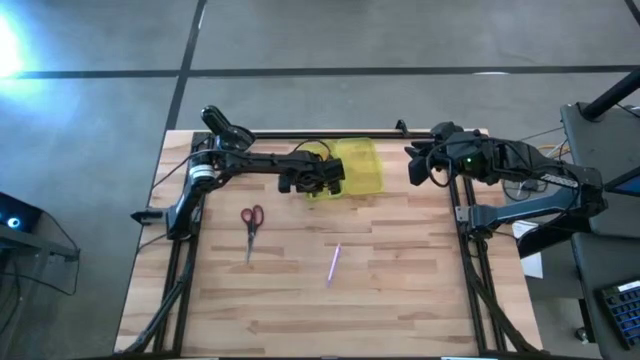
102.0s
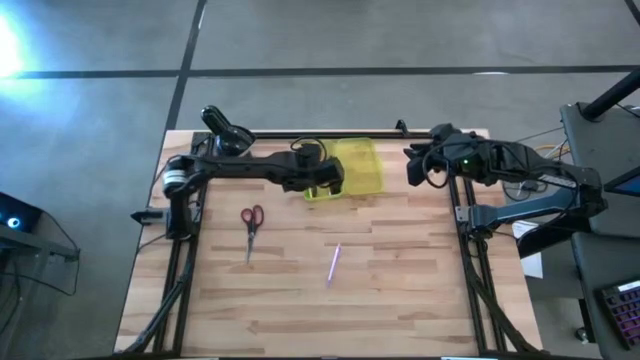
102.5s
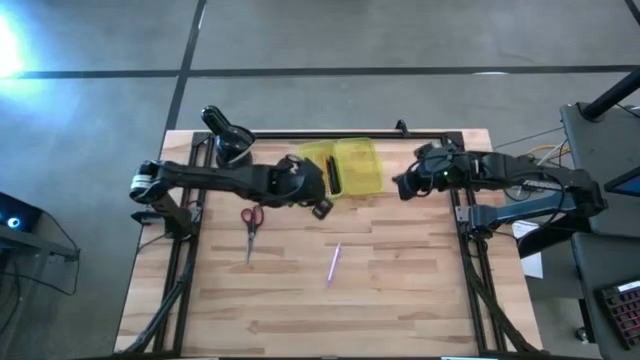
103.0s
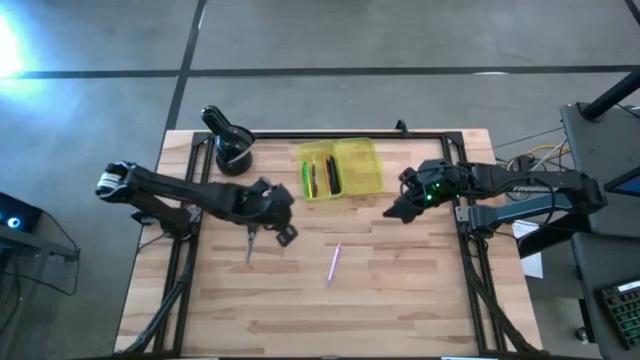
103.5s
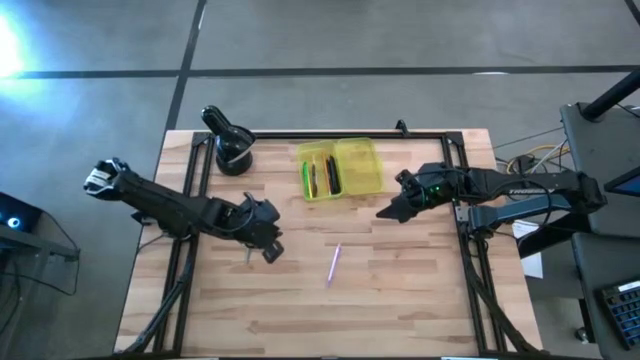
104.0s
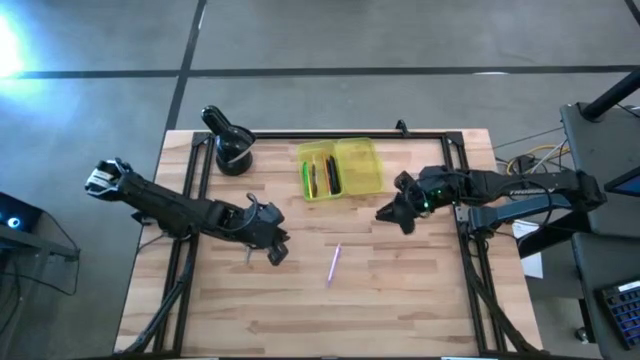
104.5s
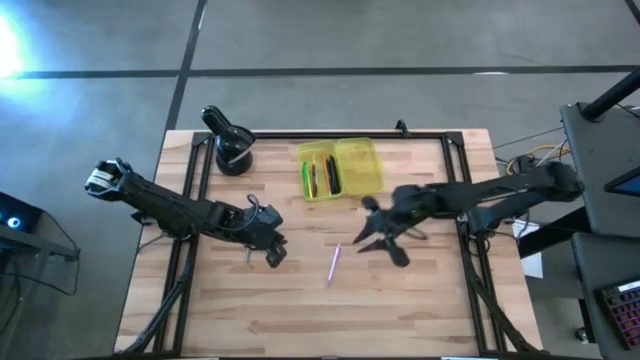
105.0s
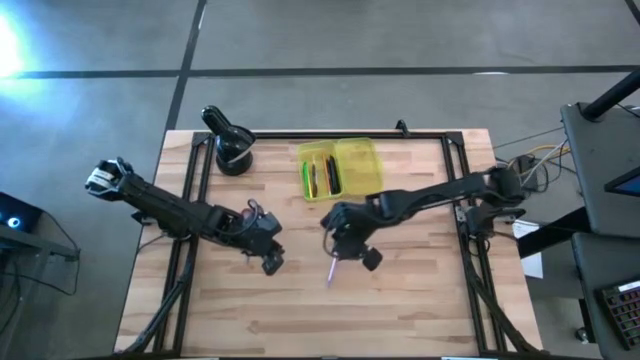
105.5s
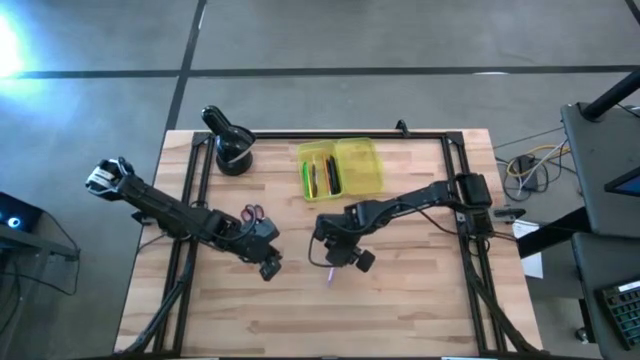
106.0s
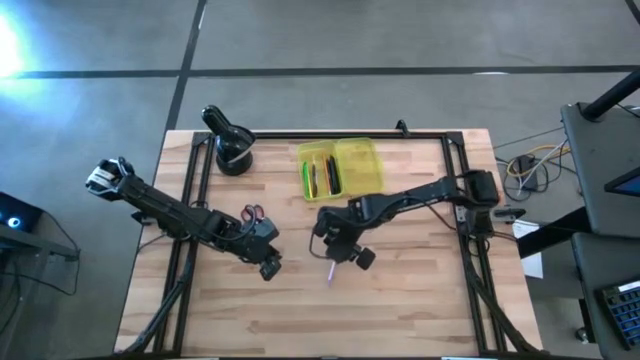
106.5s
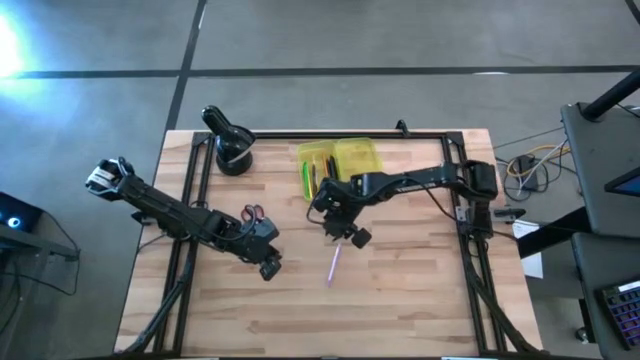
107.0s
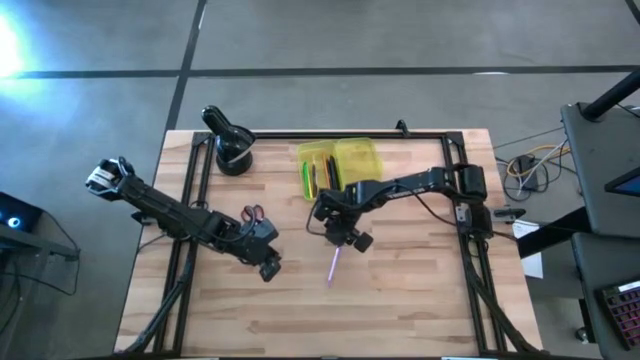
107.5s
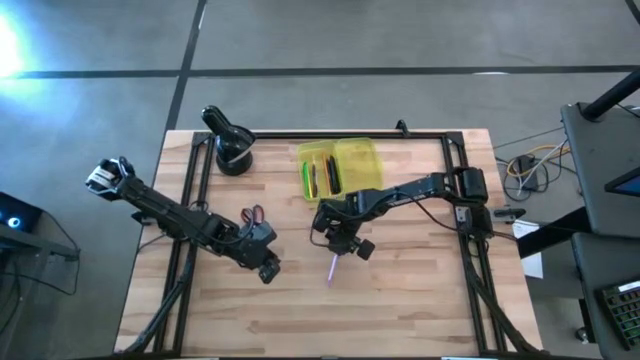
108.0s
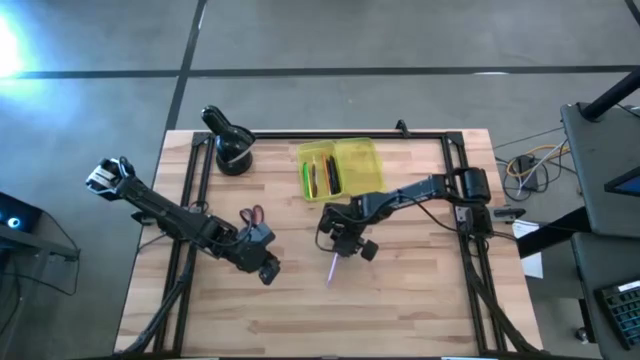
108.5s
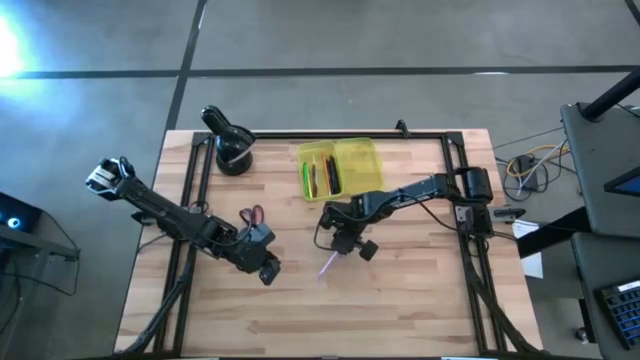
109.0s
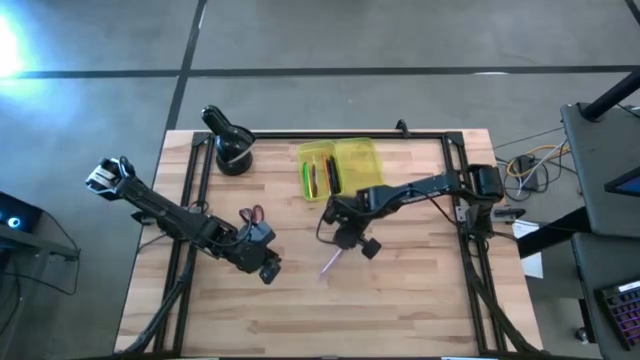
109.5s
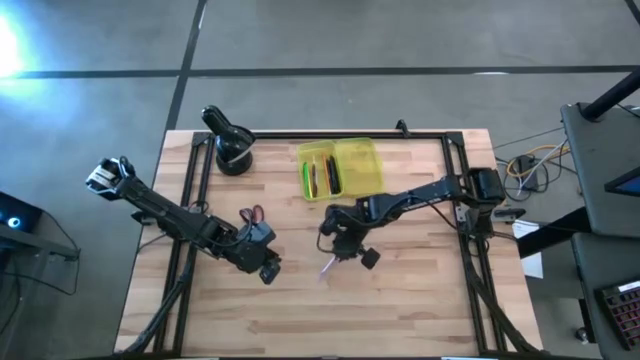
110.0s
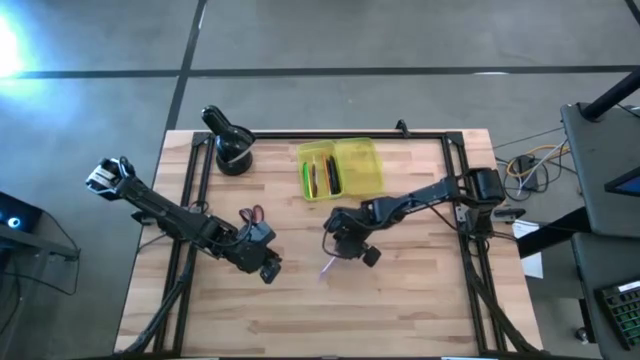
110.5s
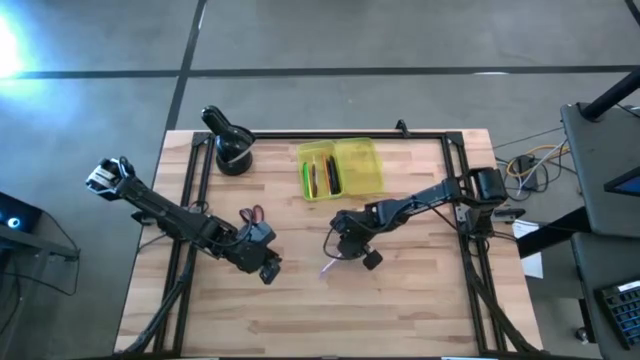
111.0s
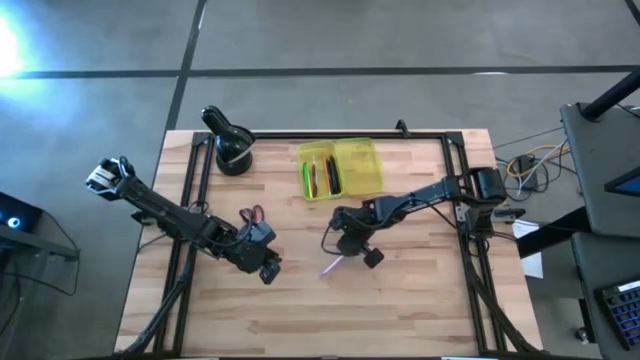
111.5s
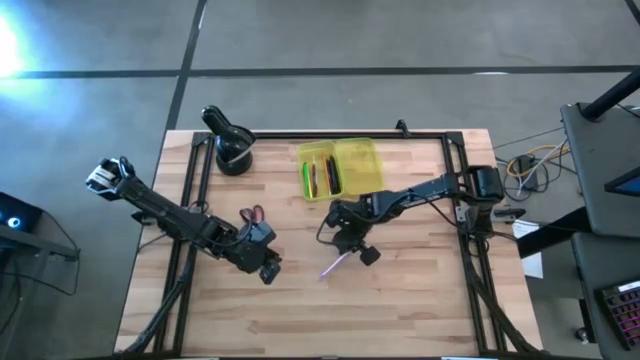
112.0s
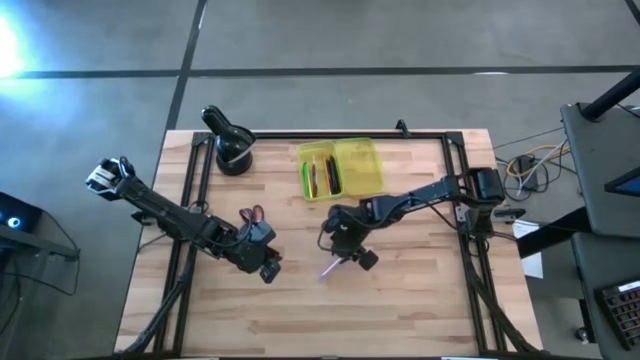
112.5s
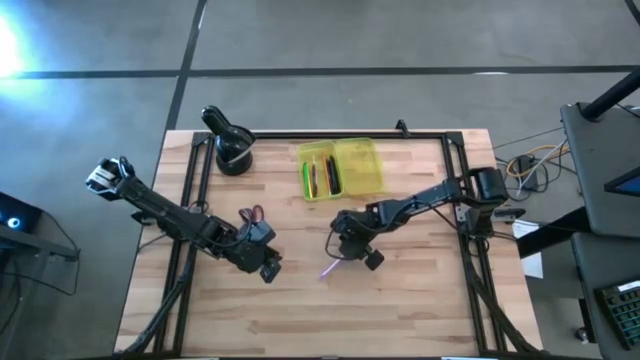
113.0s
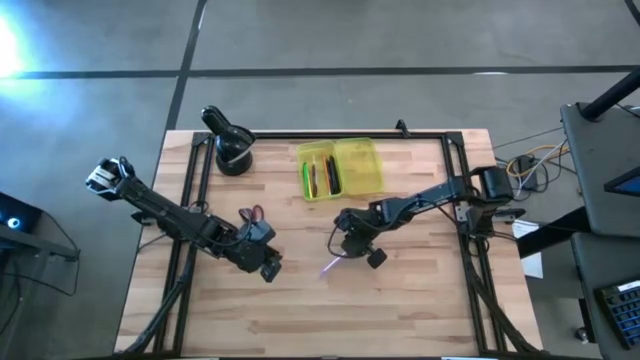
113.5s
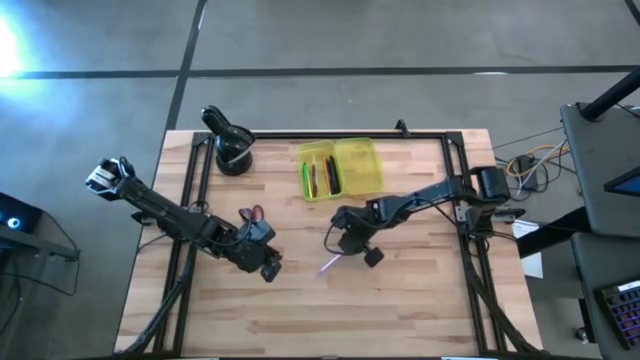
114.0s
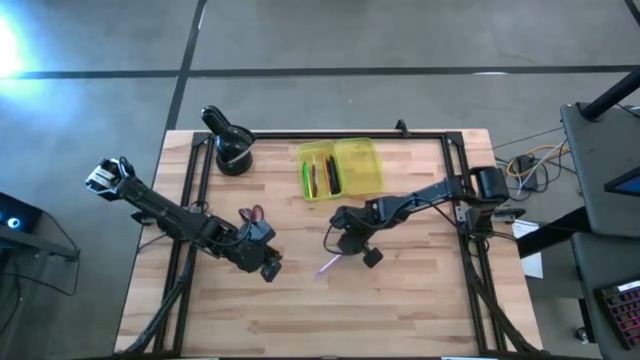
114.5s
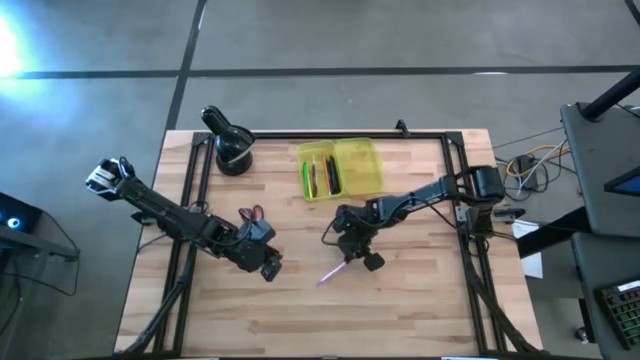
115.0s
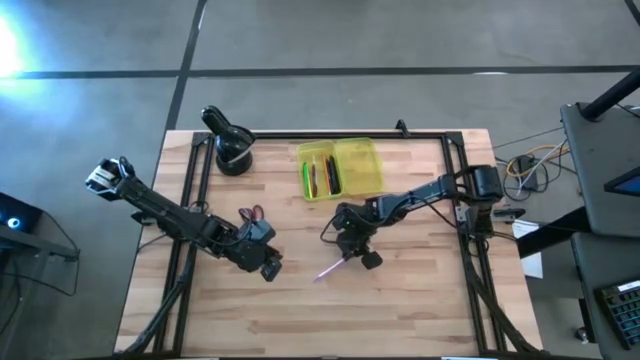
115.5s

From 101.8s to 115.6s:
Task: Pick & place school supplies into a supply box
Put the purple pencil into the yellow supply box

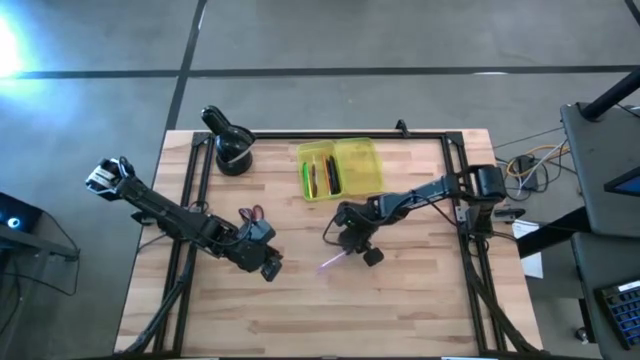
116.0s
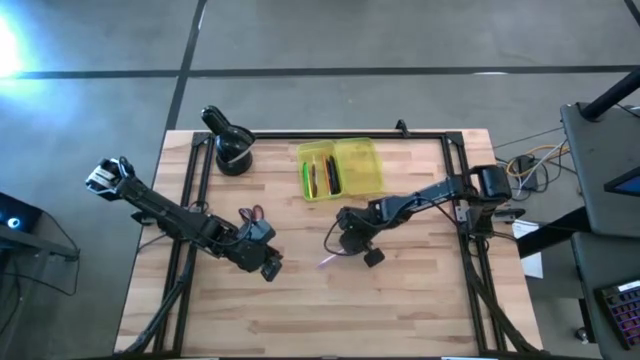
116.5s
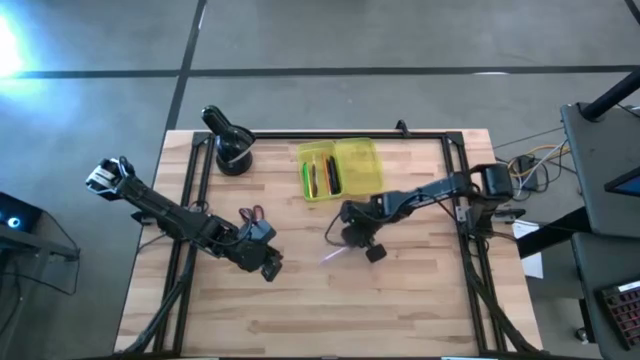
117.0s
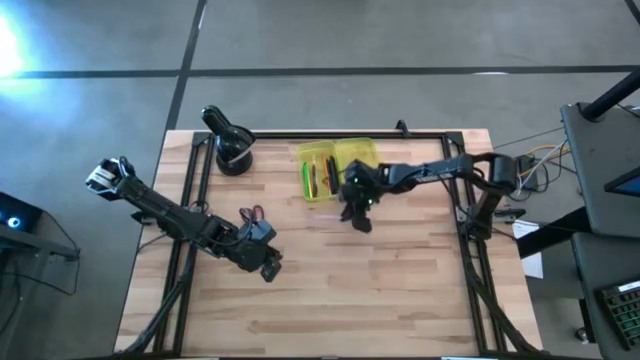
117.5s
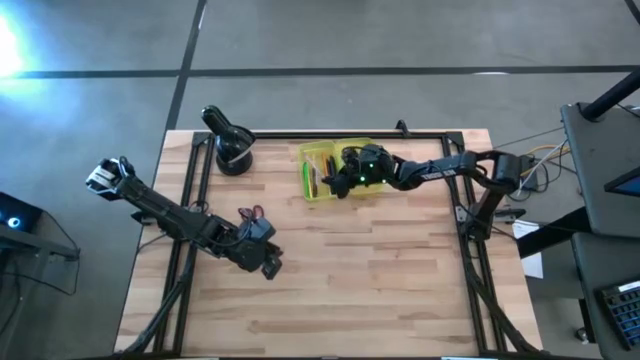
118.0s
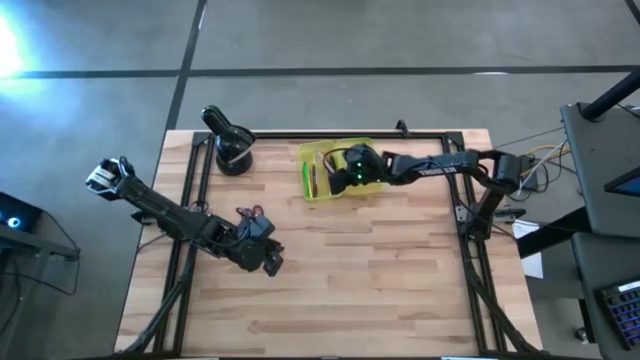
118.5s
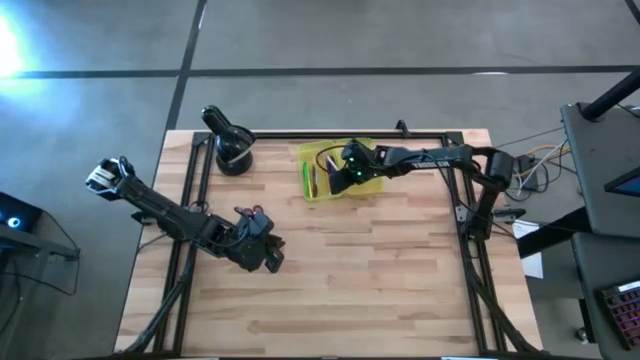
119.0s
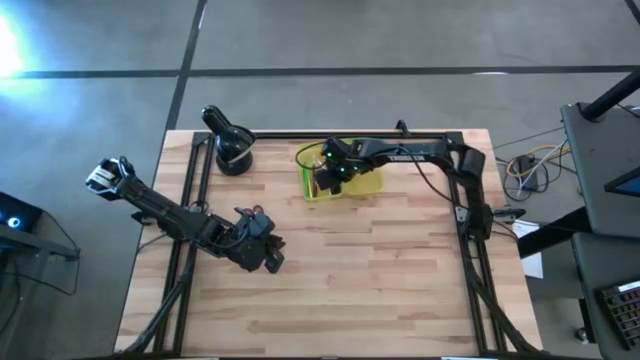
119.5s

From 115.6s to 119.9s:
Put the purple pencil into the yellow supply box

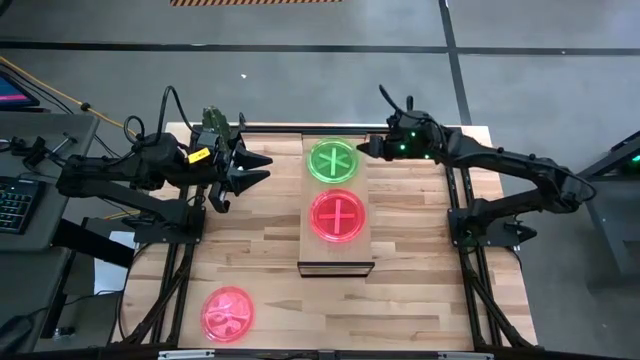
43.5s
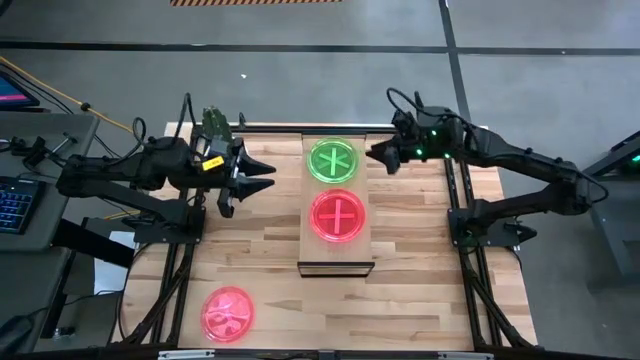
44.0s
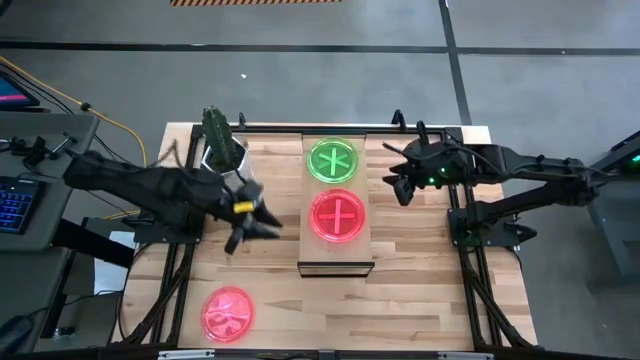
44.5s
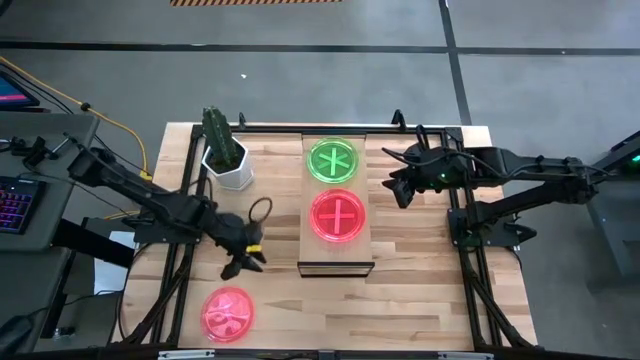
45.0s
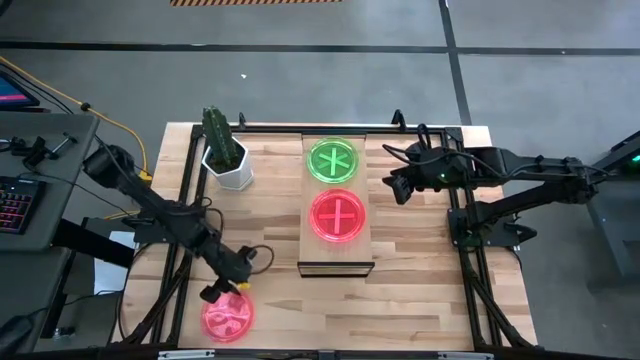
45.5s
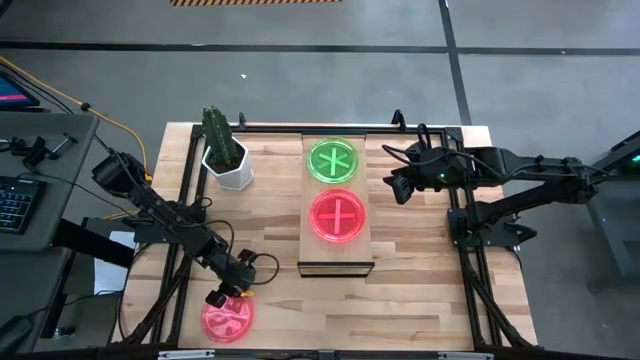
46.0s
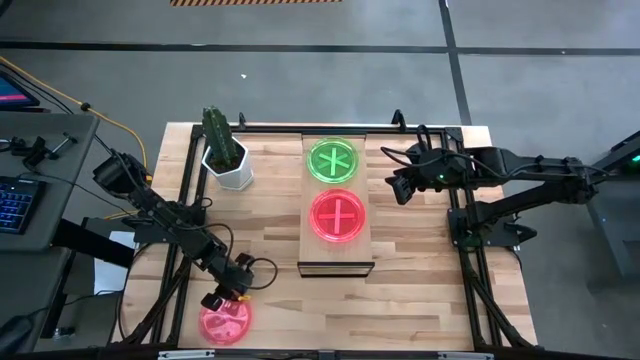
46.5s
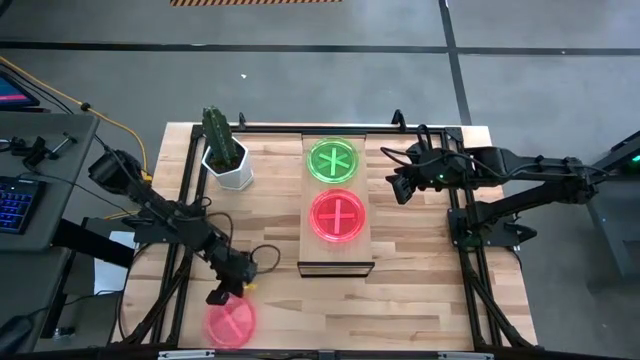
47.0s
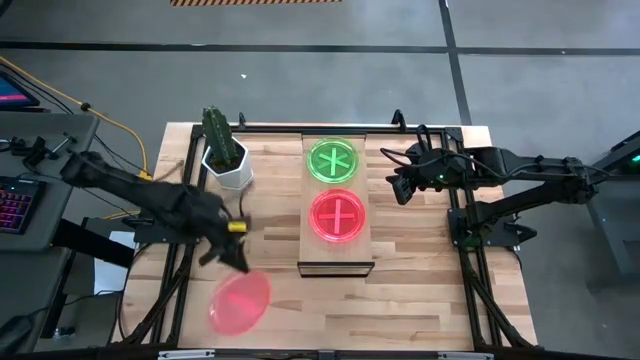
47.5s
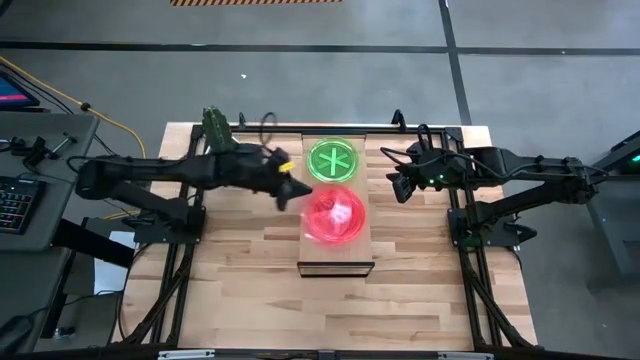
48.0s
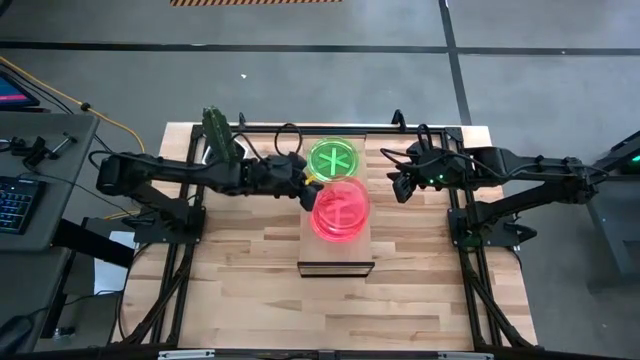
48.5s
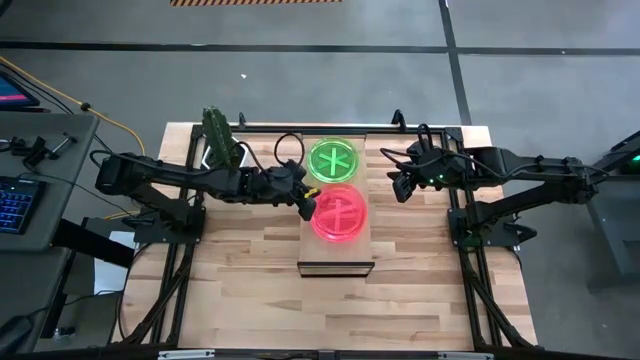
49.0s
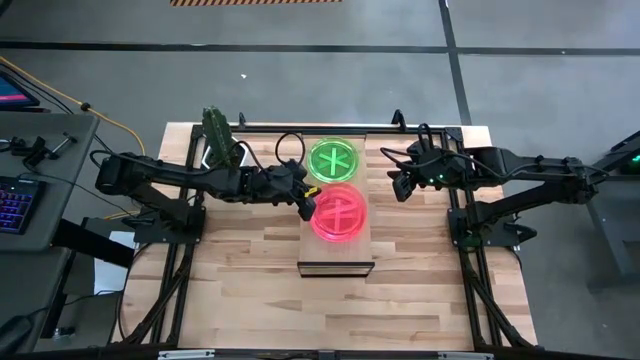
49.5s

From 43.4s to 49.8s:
Task: Place and stack plates onto a shelf
Stack the pink plate on top of the other pink plate on the shelf
